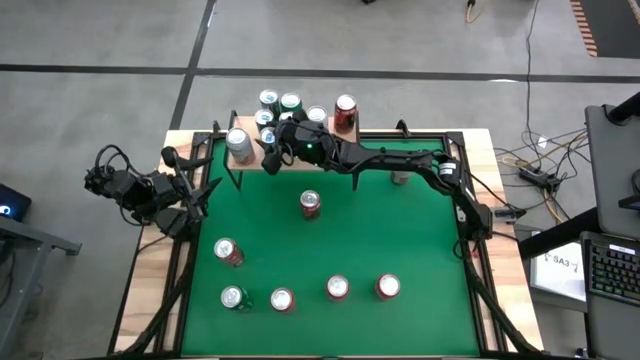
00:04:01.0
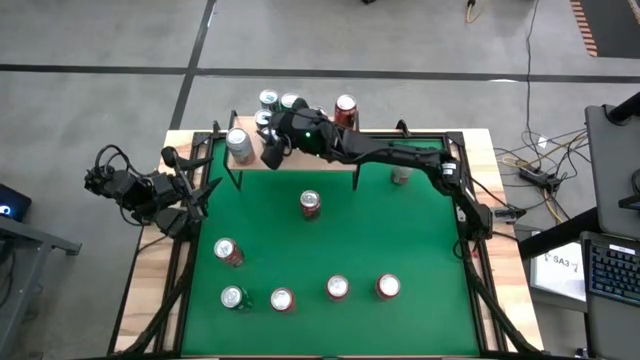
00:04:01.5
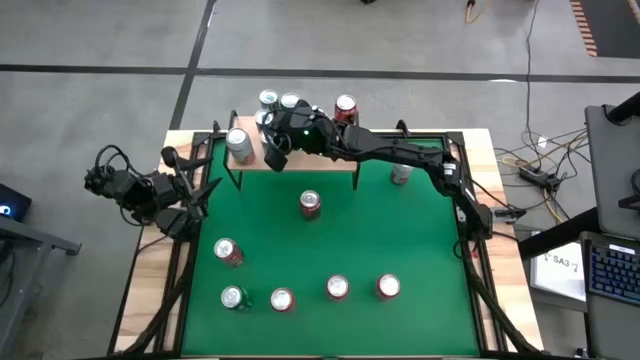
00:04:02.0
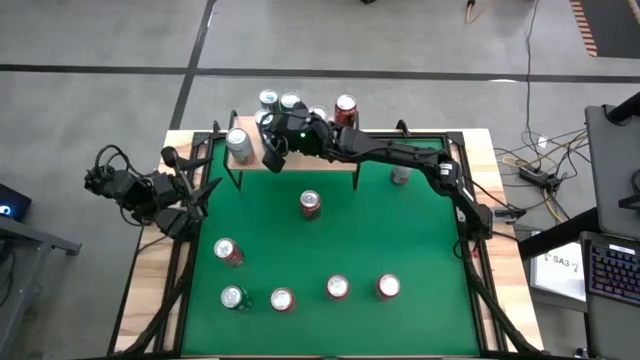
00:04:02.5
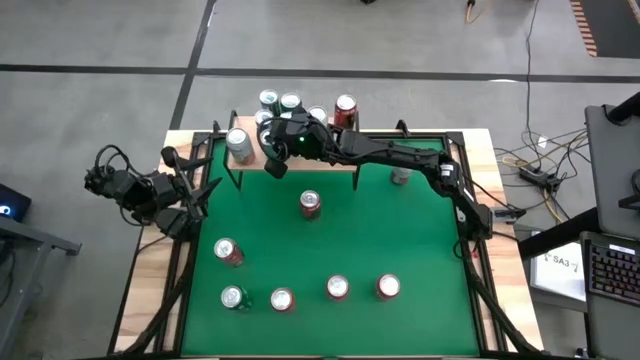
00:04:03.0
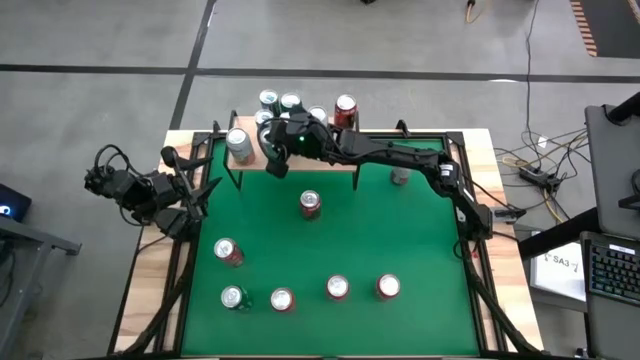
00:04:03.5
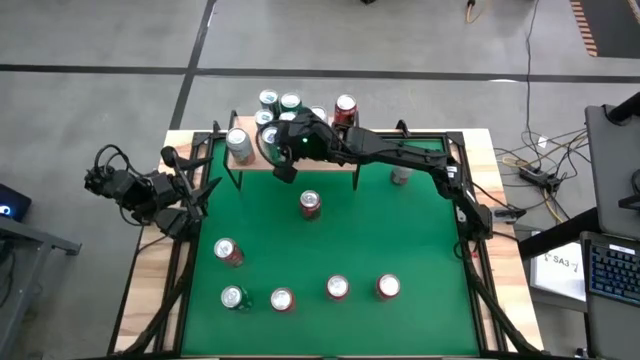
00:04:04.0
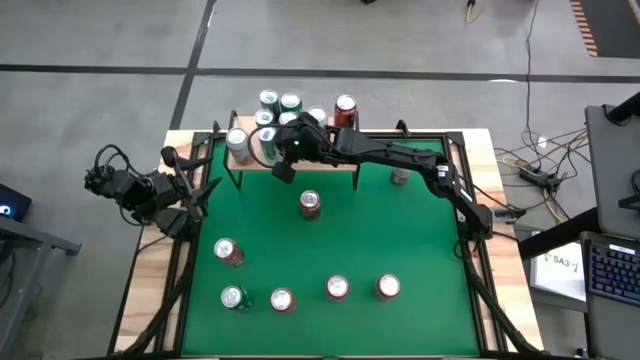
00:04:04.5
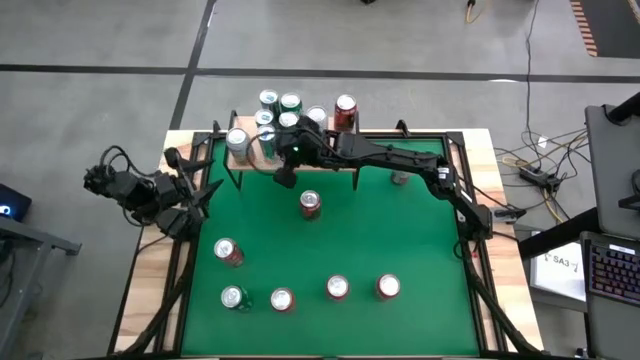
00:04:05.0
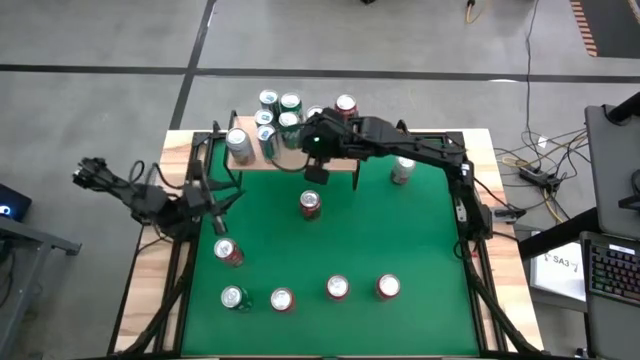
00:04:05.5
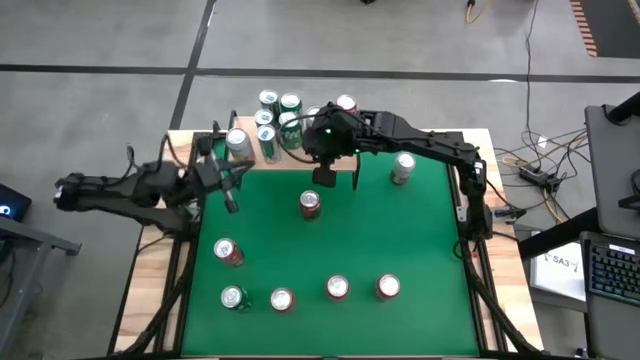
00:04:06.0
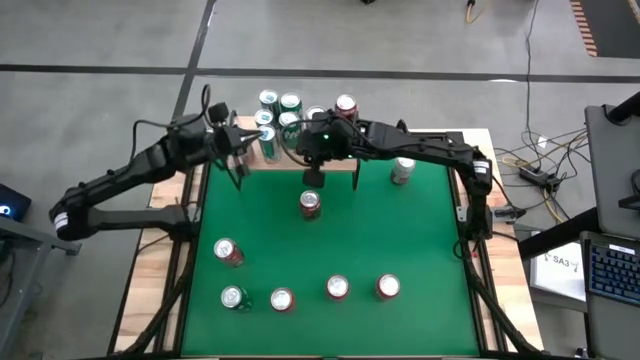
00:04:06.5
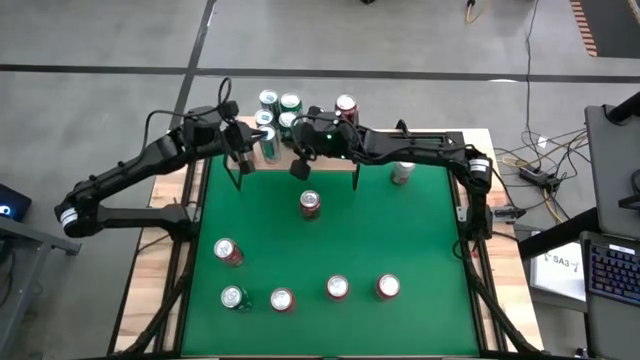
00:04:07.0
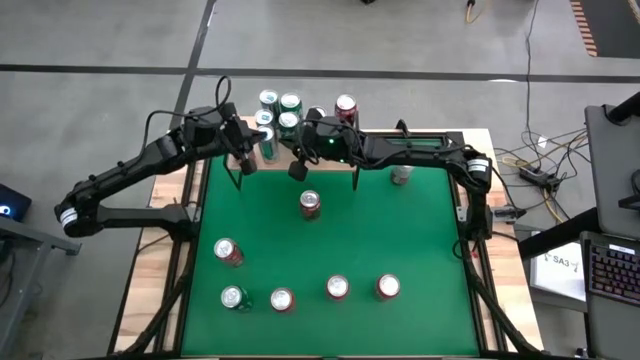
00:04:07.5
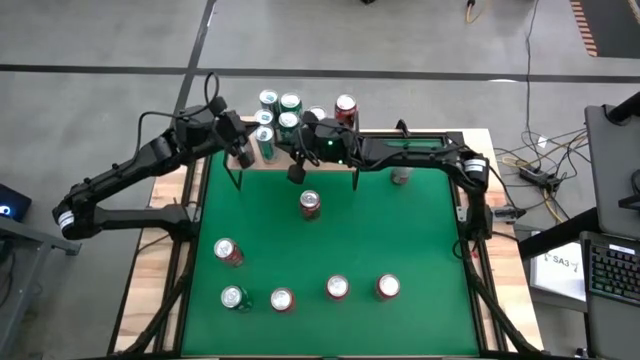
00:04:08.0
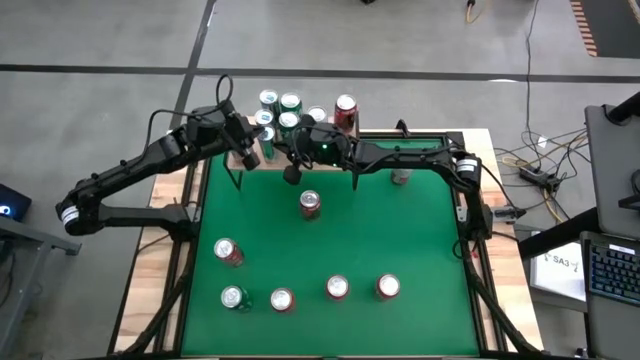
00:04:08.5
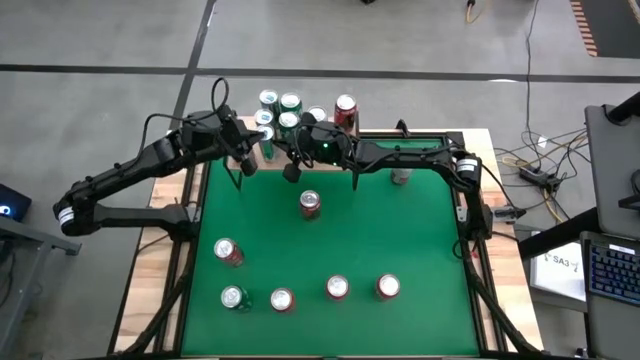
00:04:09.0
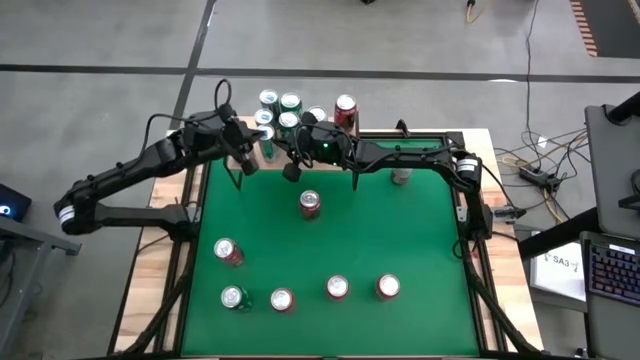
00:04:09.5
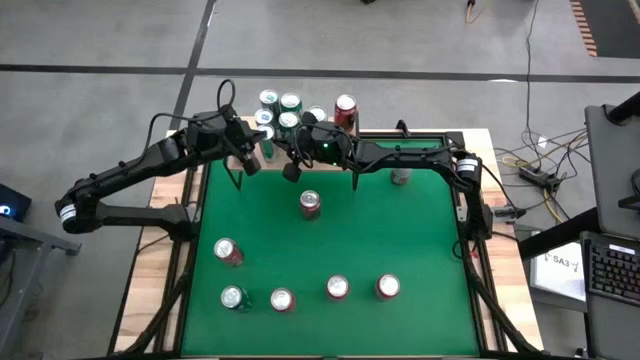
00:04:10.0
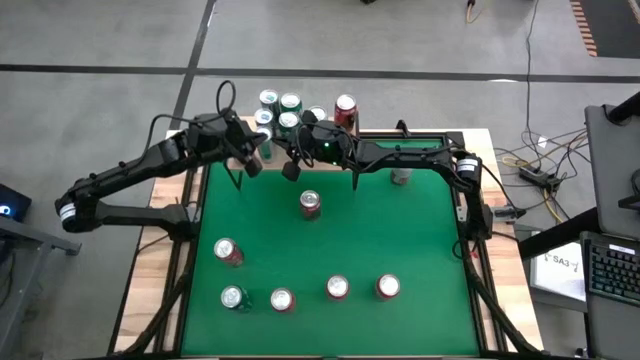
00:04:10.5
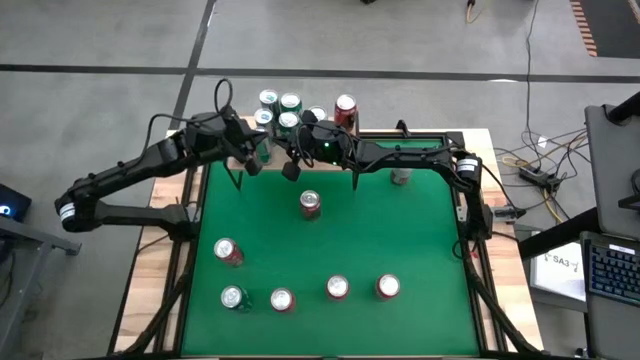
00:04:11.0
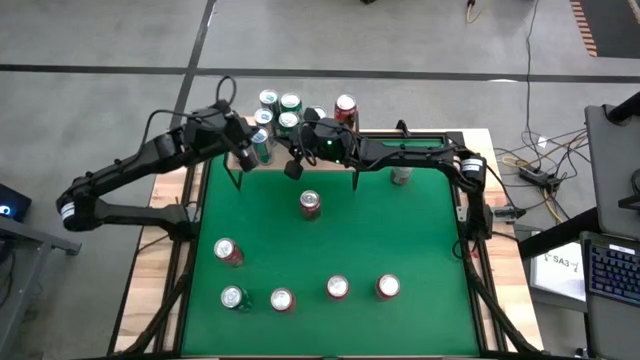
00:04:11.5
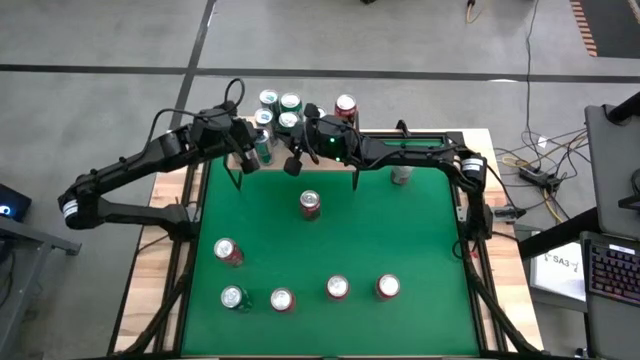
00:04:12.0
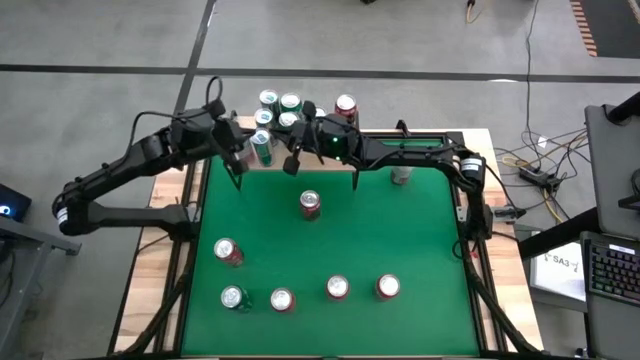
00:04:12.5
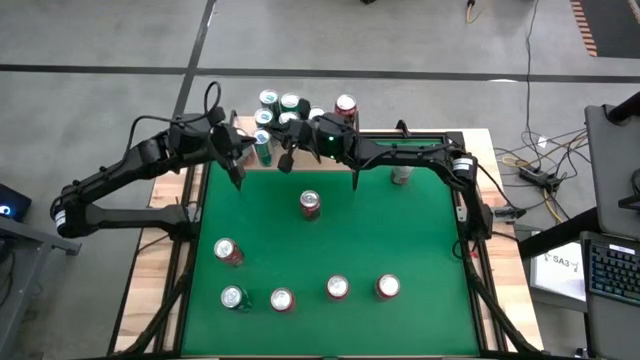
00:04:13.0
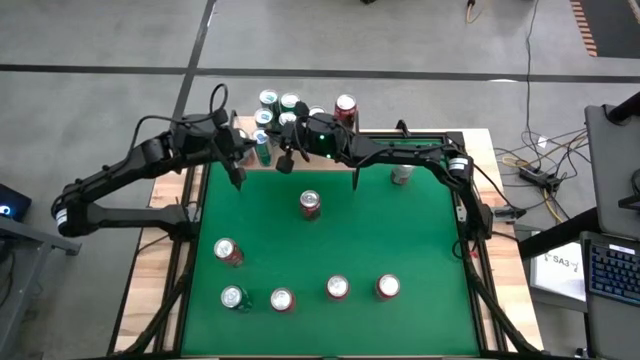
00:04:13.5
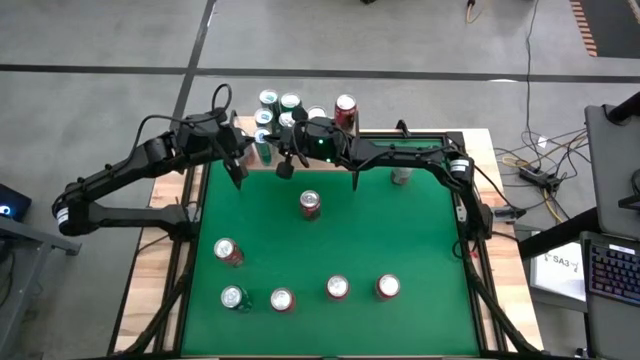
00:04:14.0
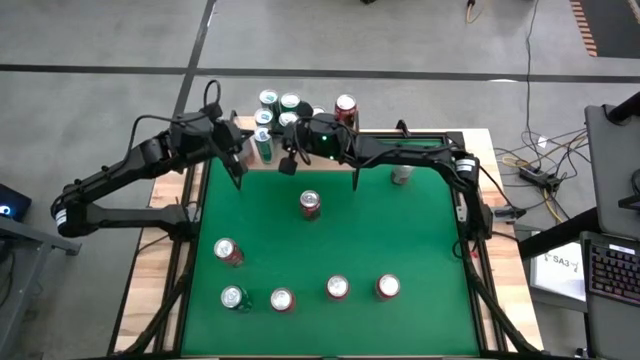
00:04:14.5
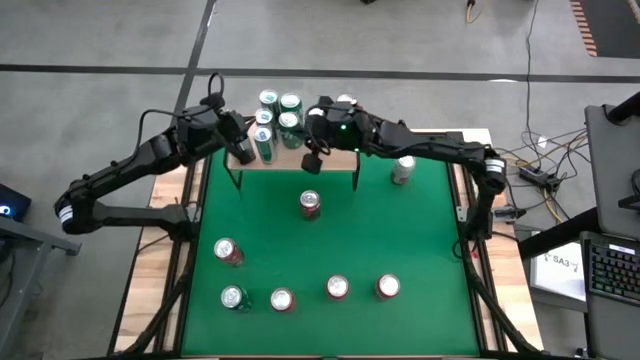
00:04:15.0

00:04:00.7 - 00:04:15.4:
Task: Place canned beverage on shelf
Put the white and red can on the shelf

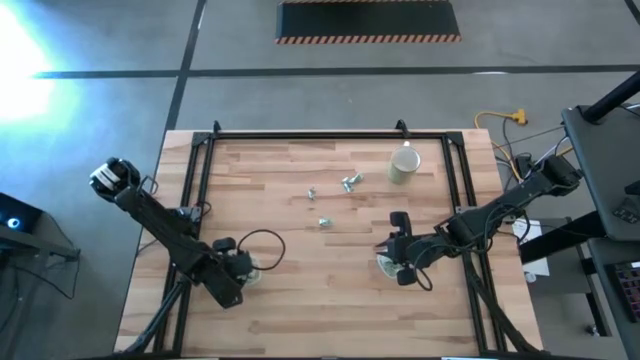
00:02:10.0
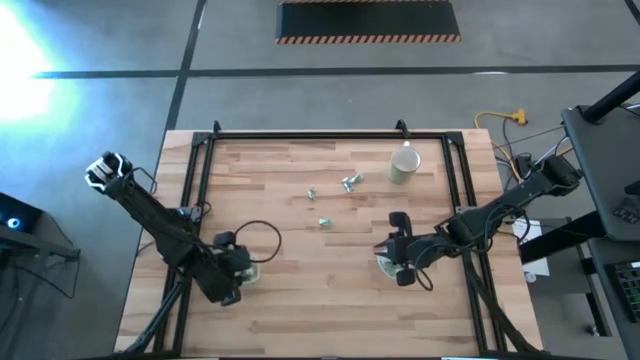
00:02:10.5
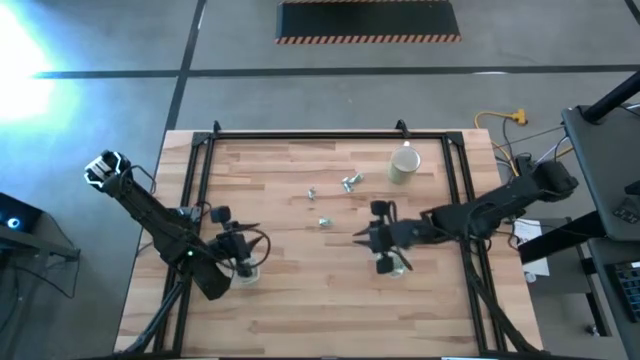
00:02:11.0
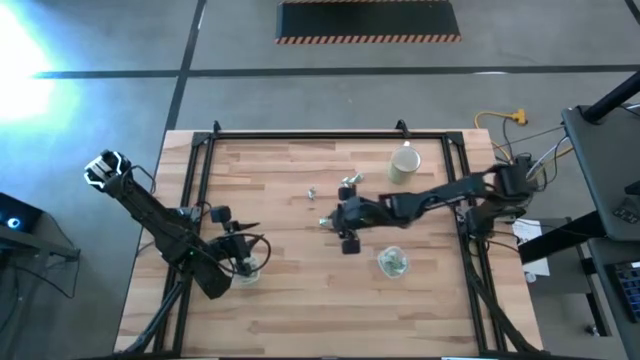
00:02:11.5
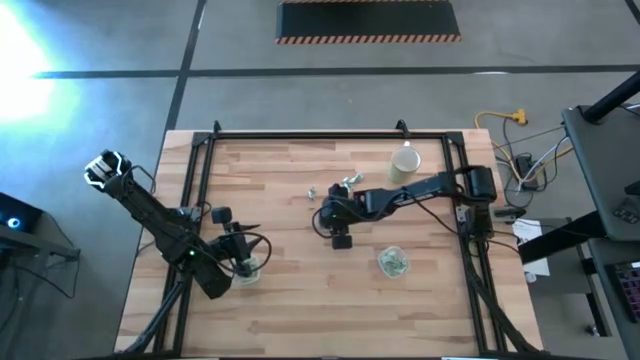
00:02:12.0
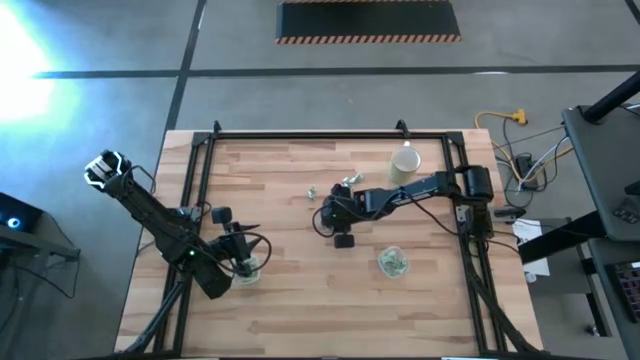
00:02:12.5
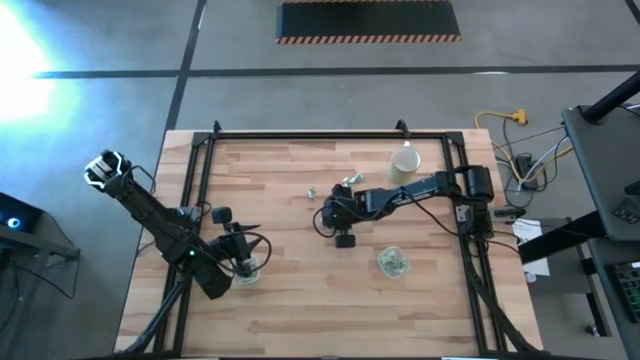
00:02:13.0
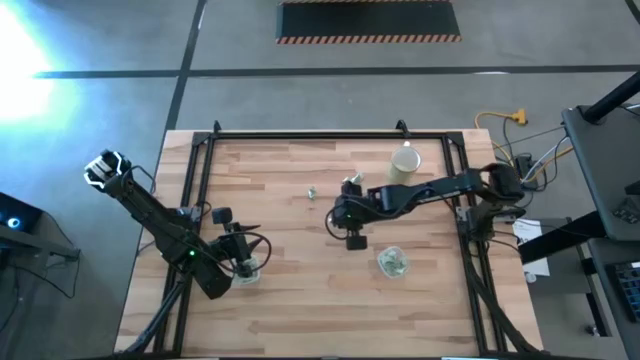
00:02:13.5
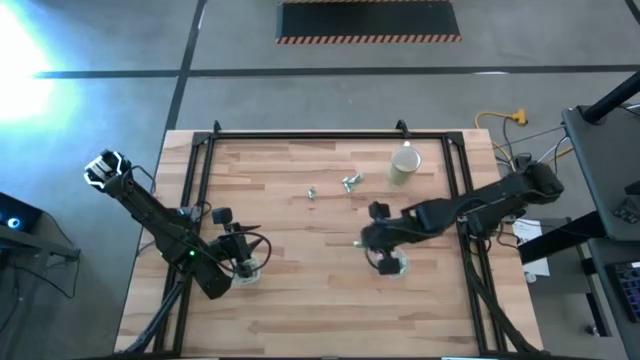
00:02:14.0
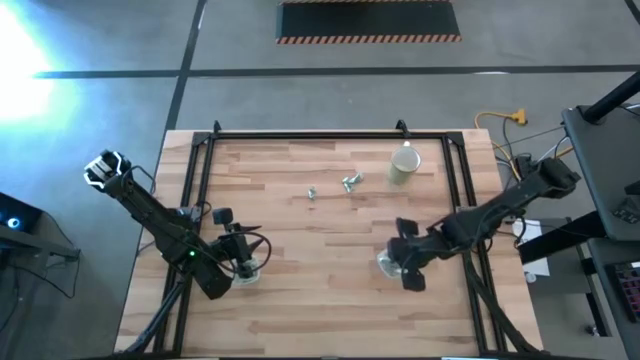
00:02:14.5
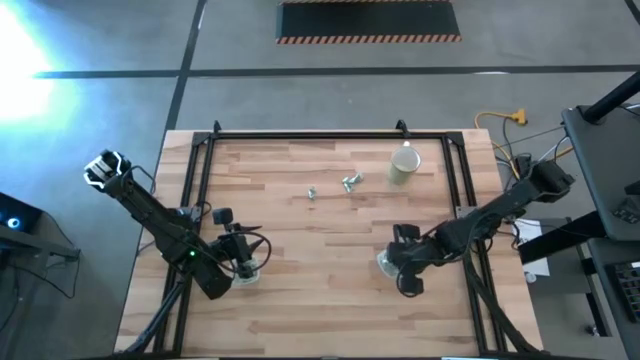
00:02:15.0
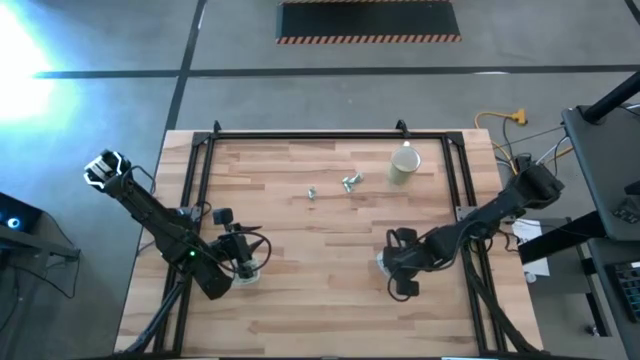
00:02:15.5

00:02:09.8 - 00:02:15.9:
Task: Pick and place Stevia / Truvia into bins
Put the stevia packet into the right transparent container
